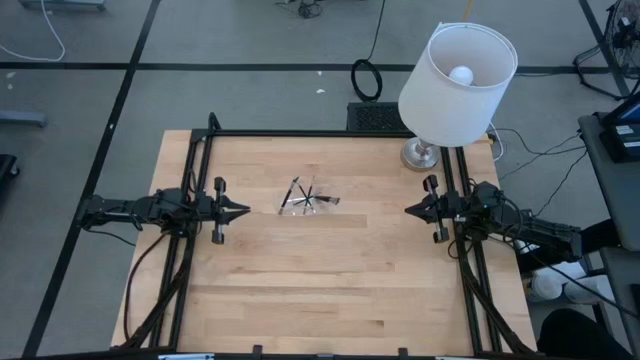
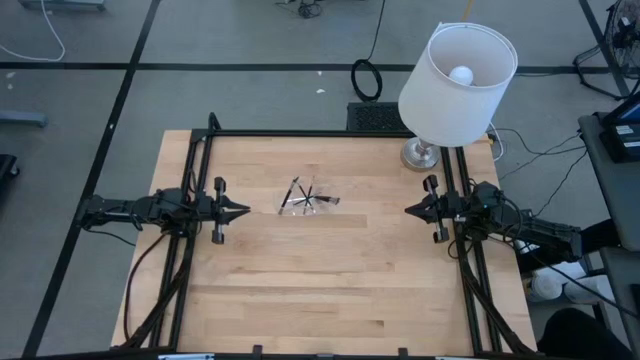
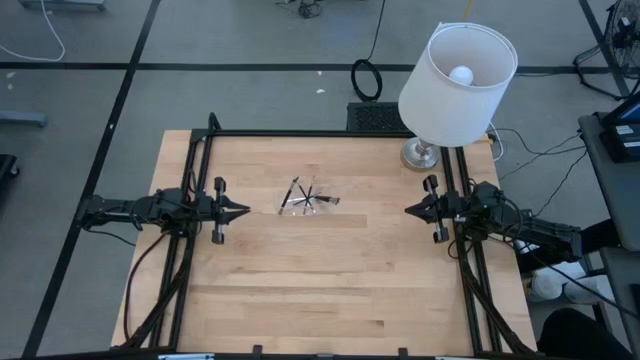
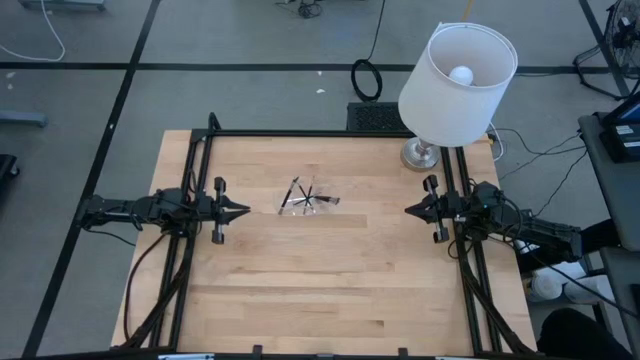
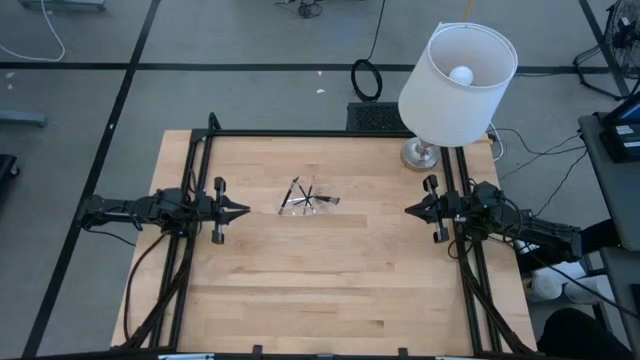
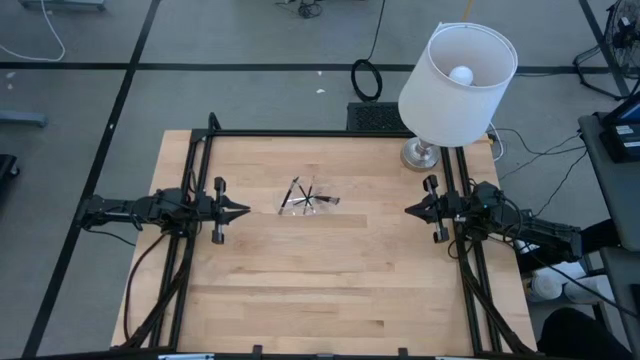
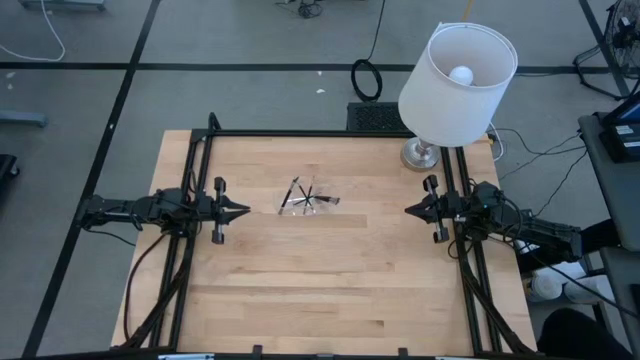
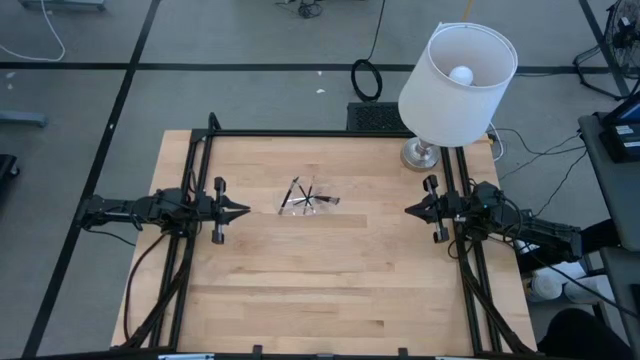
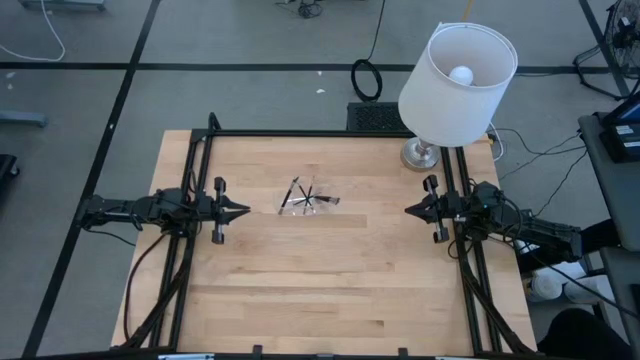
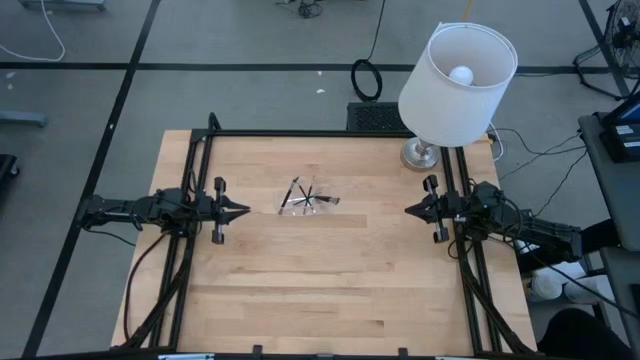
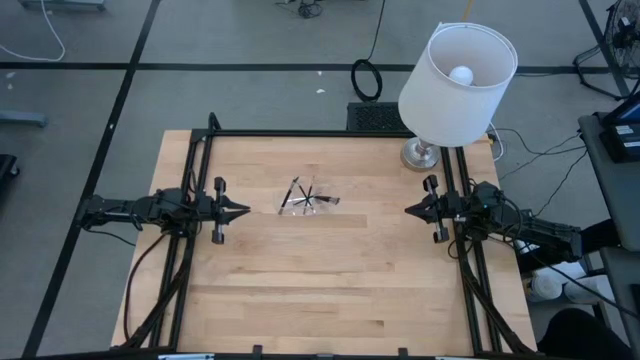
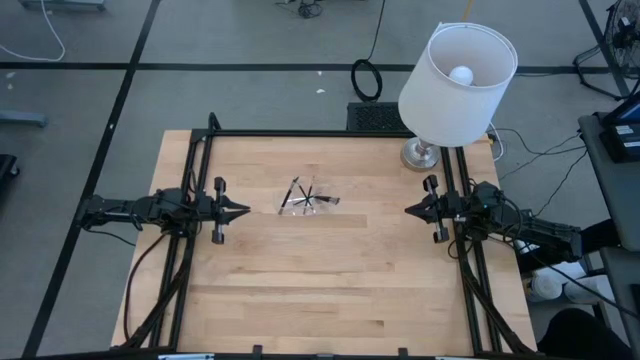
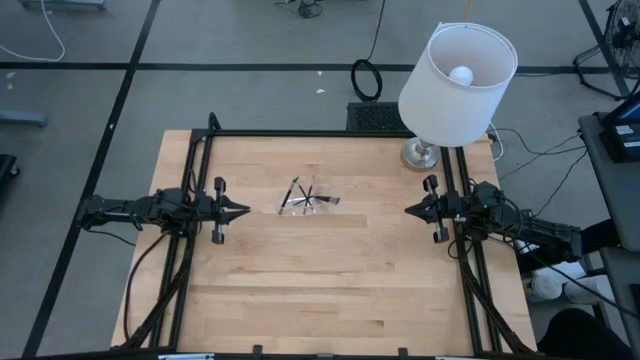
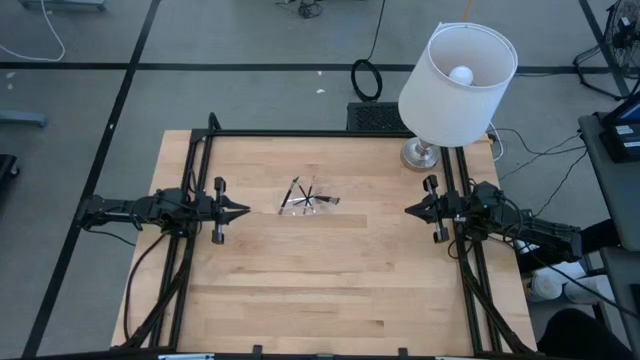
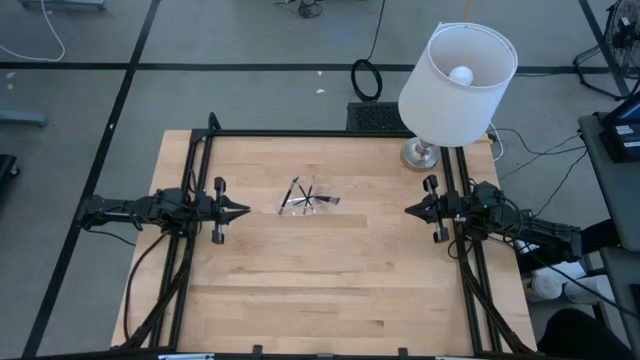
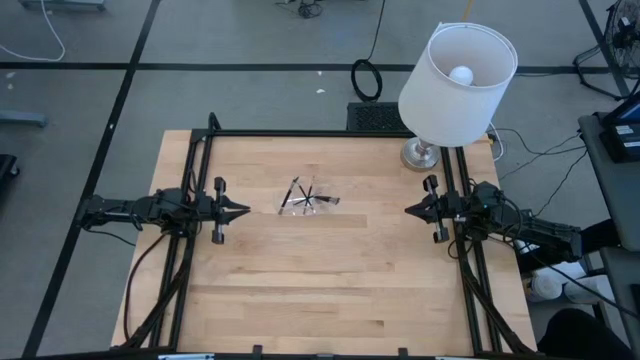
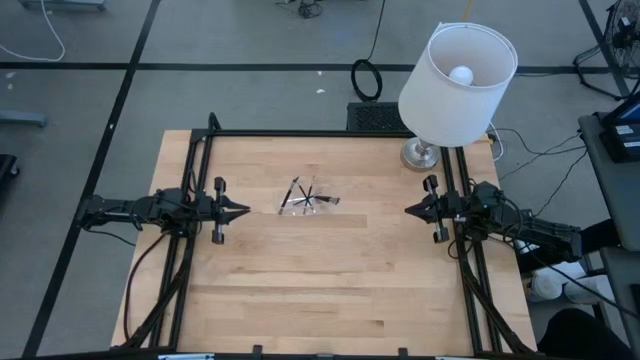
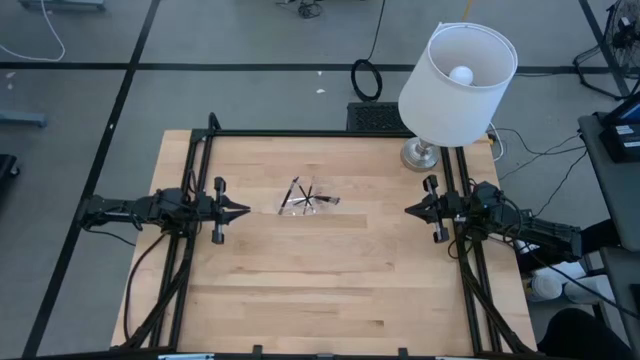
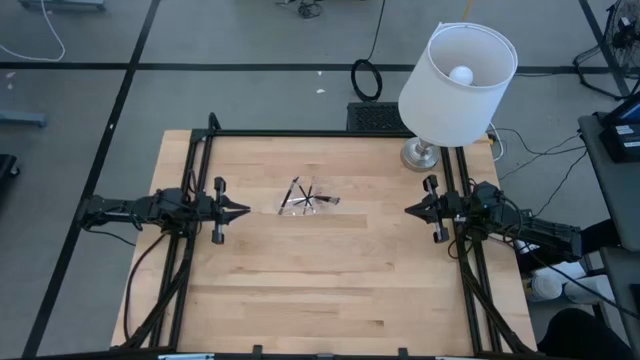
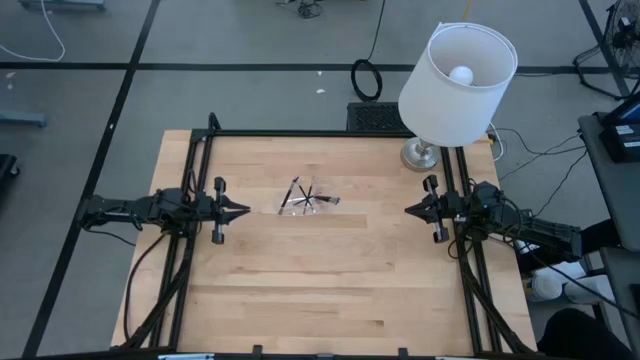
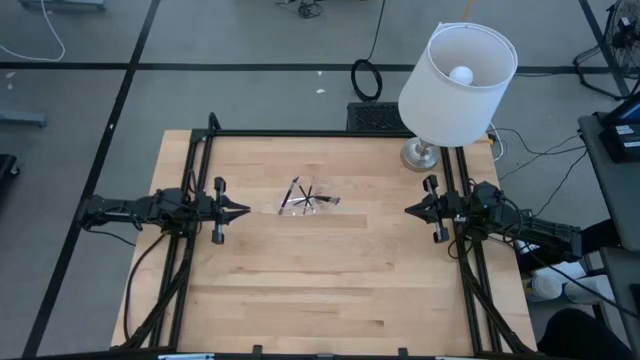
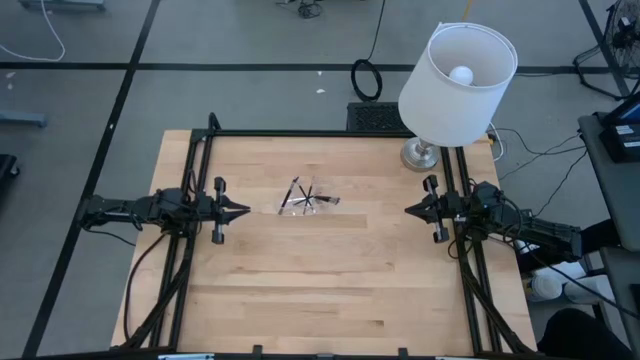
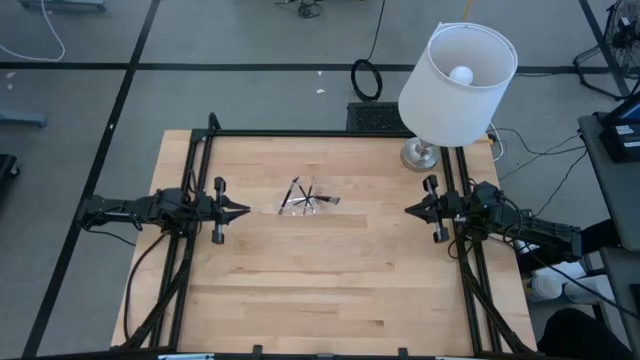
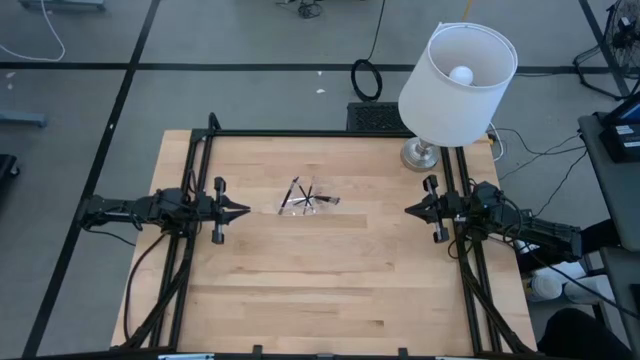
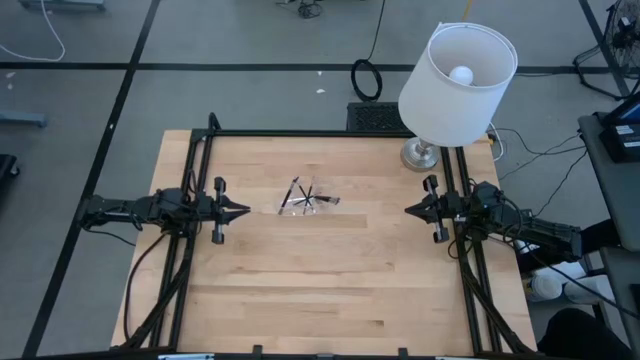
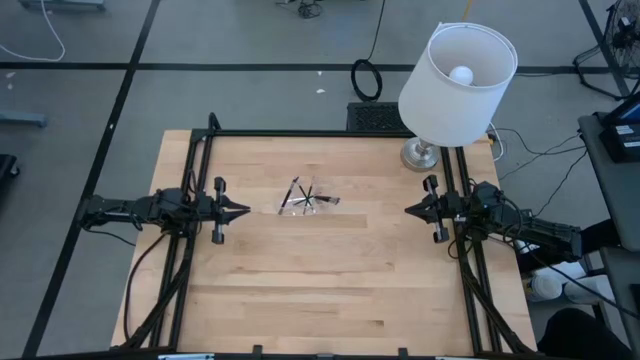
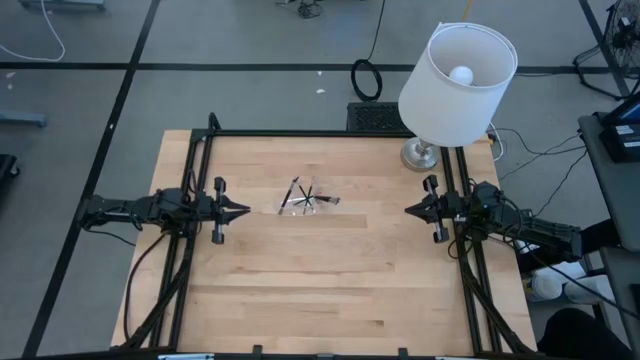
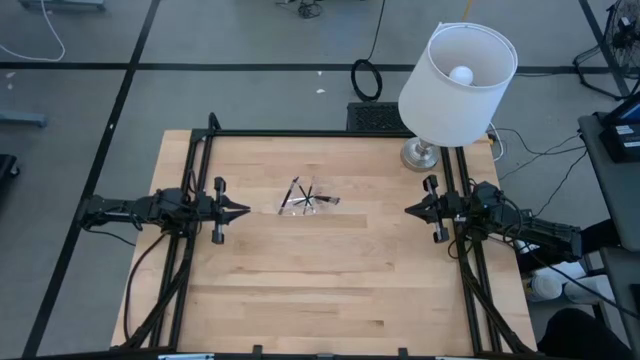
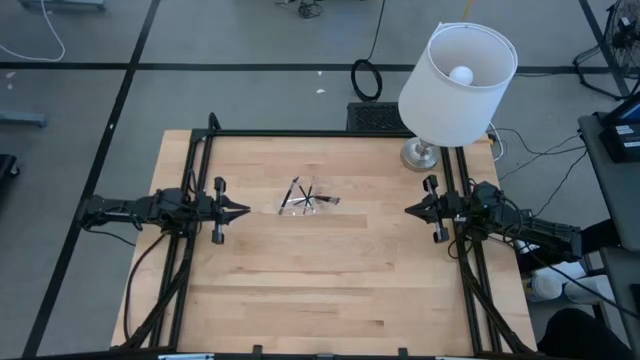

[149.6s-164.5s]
Task: Put items in baskets/containers
Return to Home Position

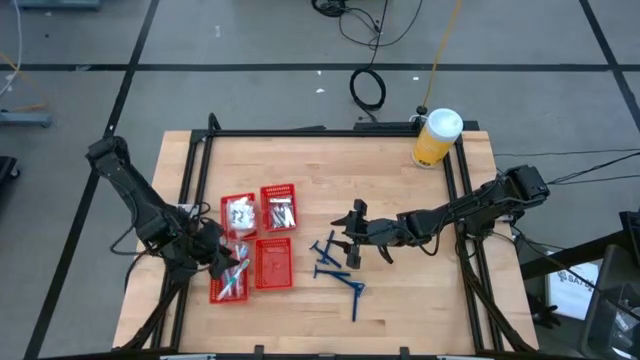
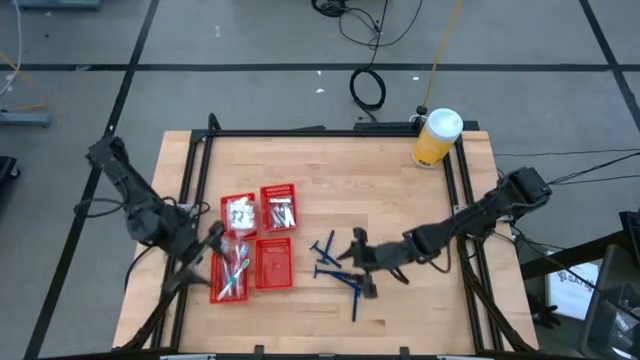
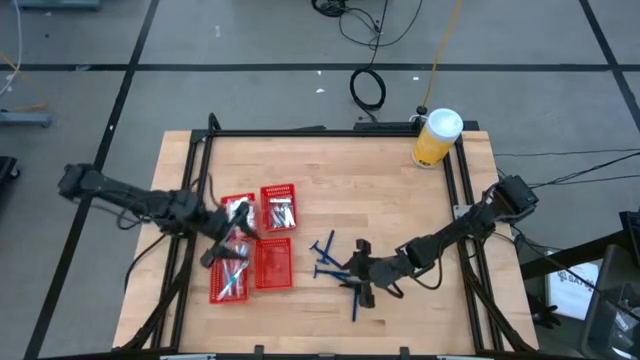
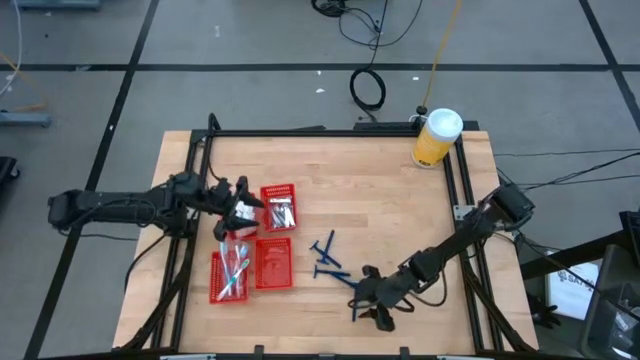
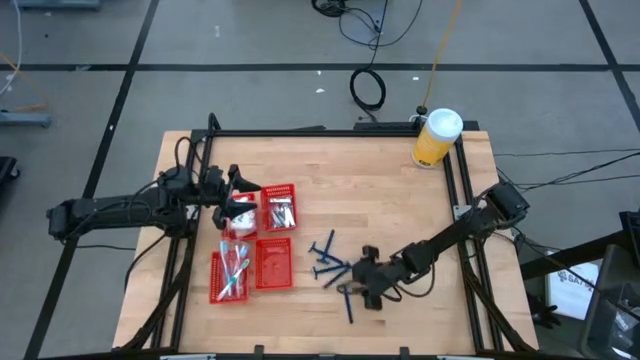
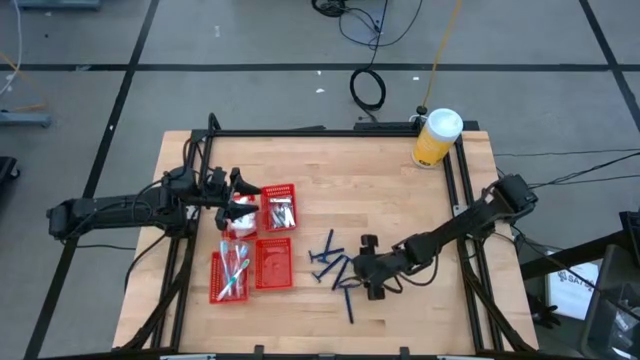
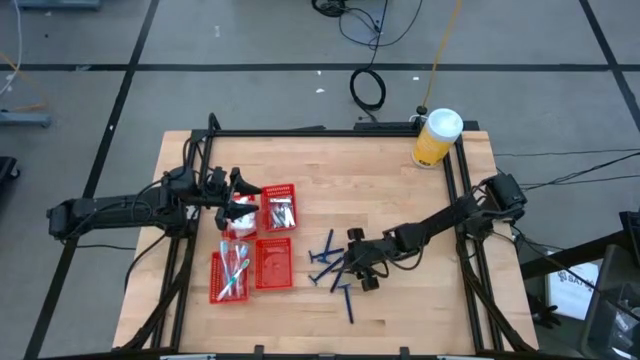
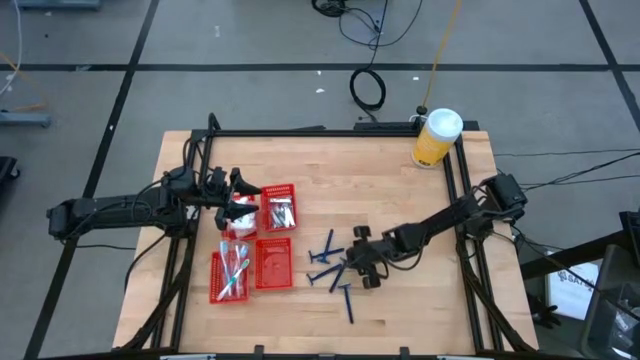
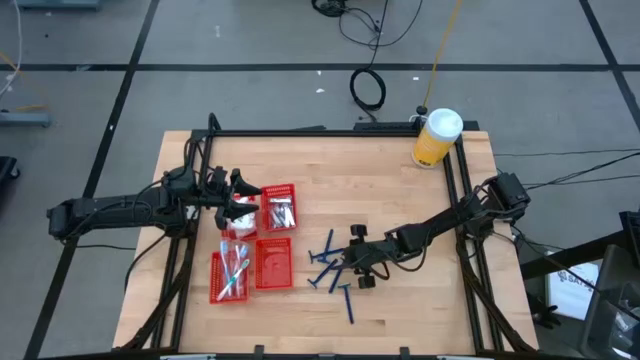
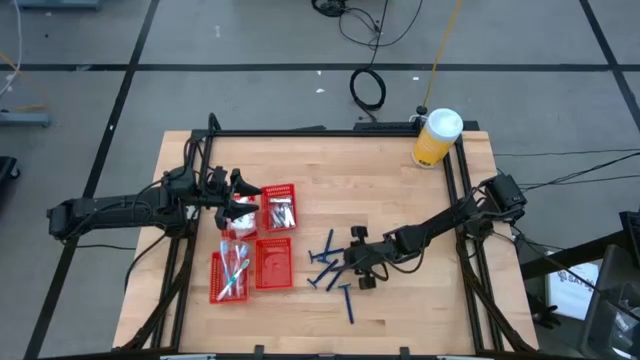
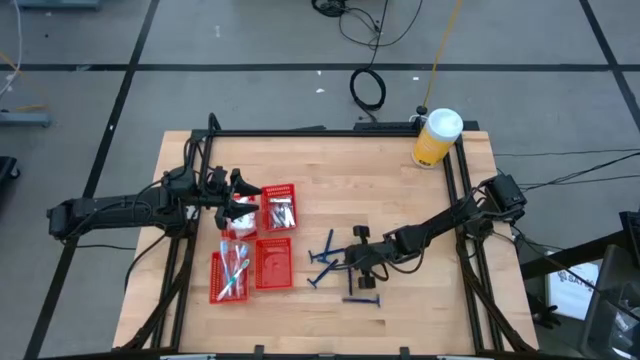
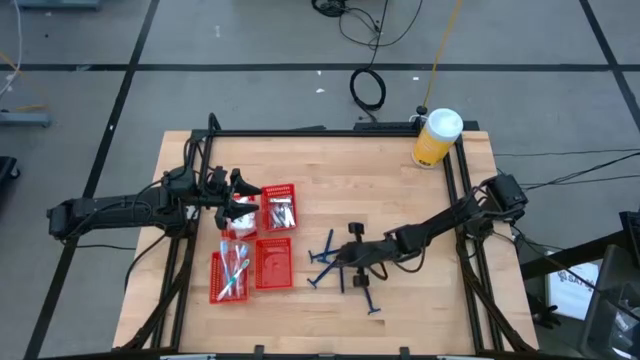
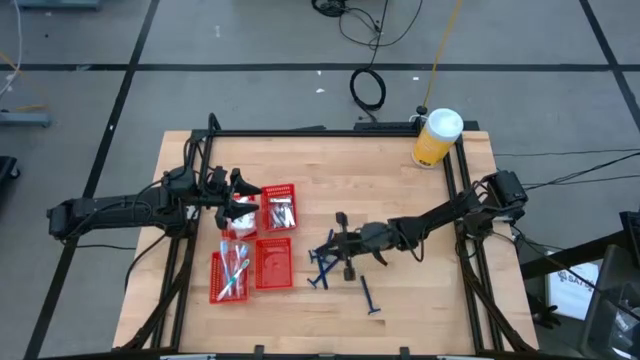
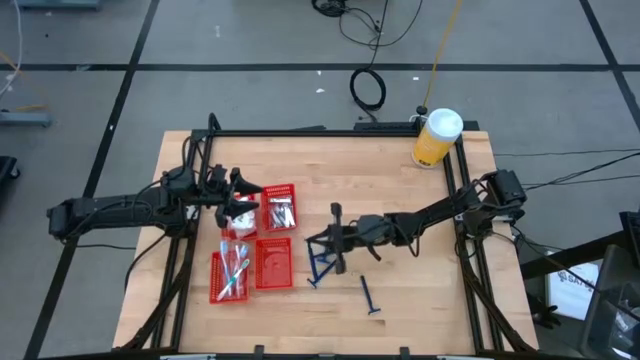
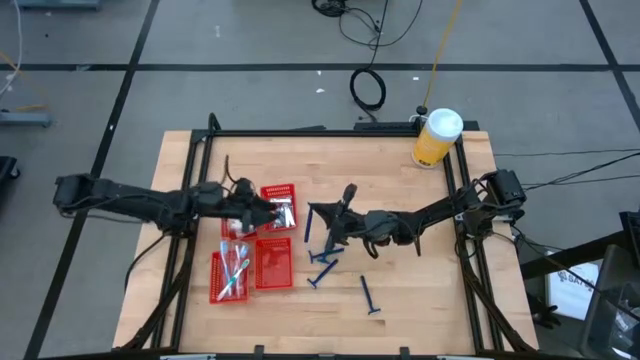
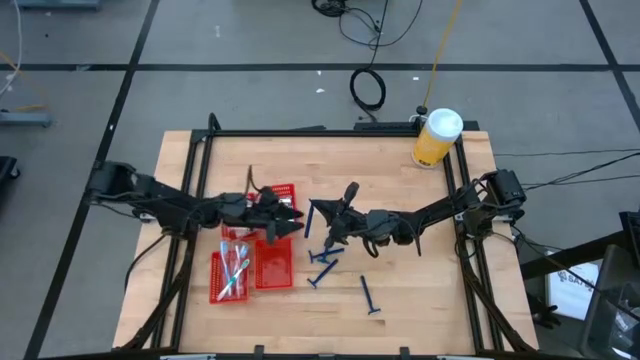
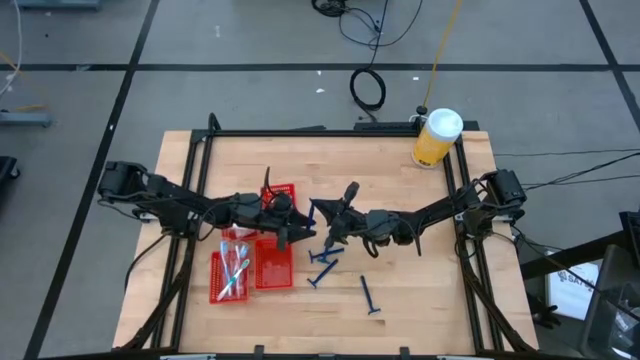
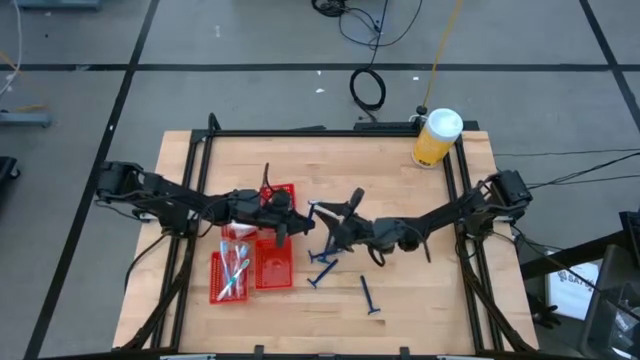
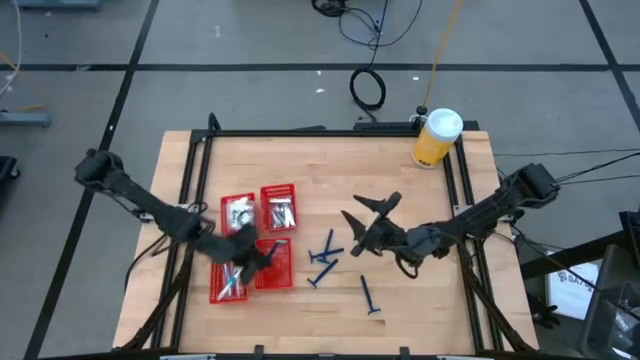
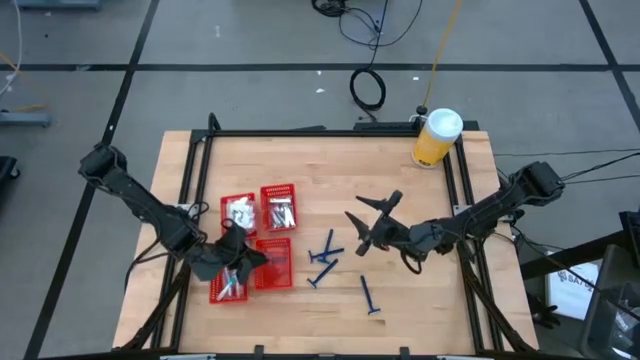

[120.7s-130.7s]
Task: Pick & Place Travel size toiletries
Put the blue razor into the bottom right red basket
